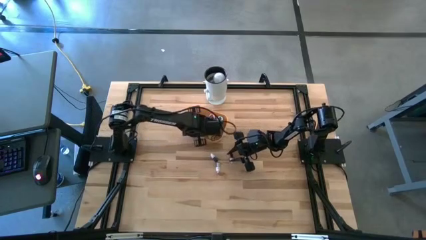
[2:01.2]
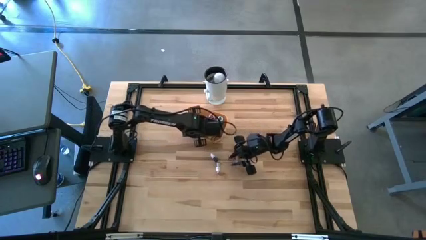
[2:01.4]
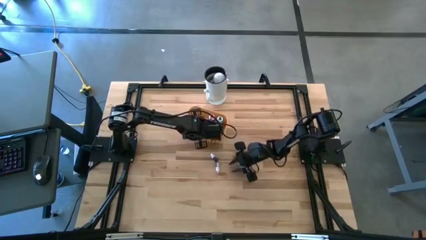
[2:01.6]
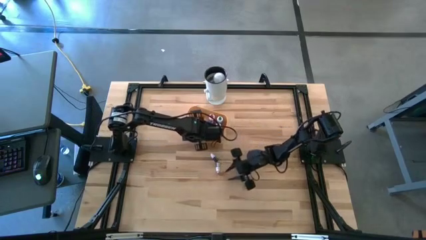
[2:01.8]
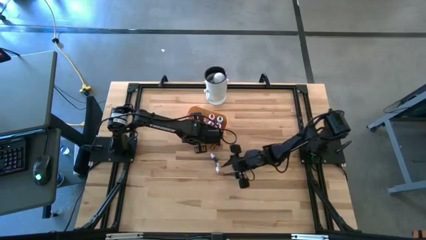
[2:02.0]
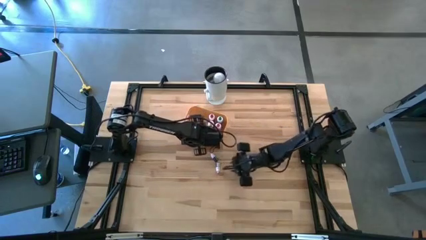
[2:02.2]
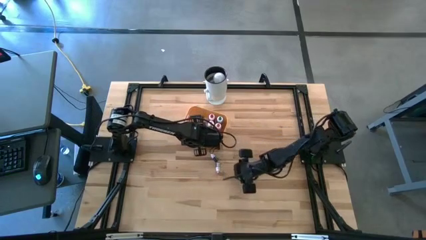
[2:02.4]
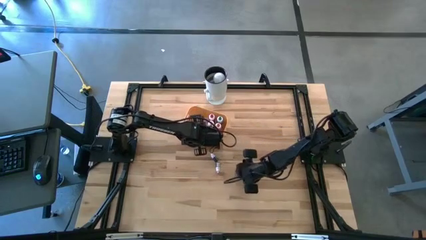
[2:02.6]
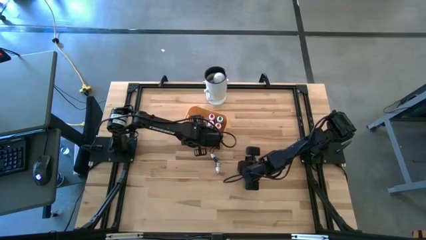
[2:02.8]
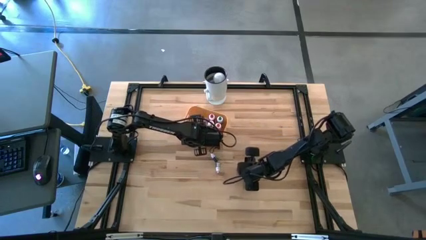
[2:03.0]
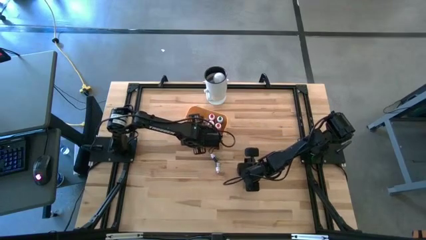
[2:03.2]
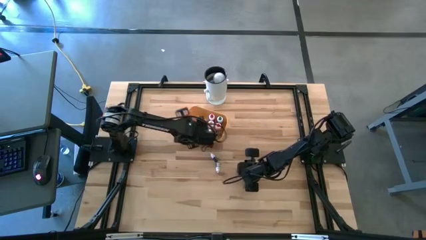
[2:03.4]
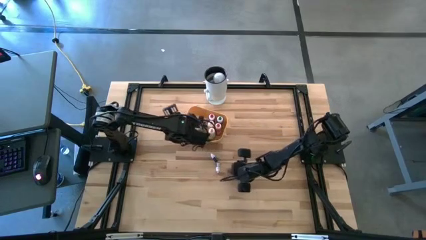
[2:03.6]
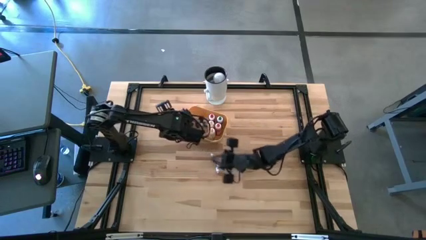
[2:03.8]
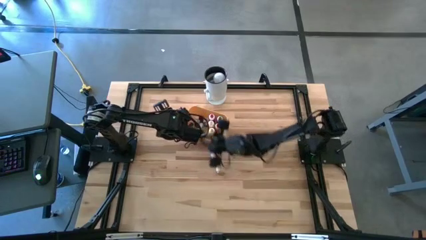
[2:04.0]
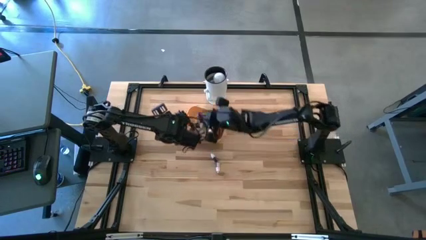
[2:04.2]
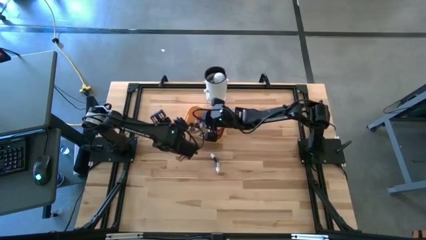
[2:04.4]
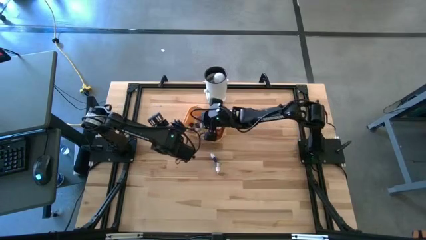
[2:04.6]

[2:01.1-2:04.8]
Task: Pick & Place food coloring
Put the orange food coloring bottle into the yellow bin

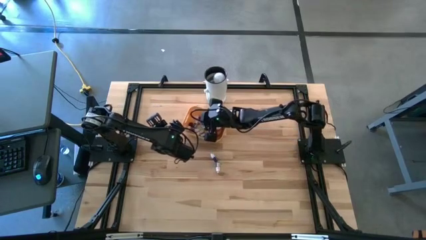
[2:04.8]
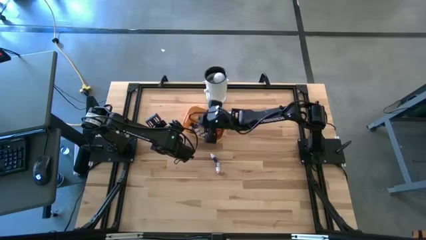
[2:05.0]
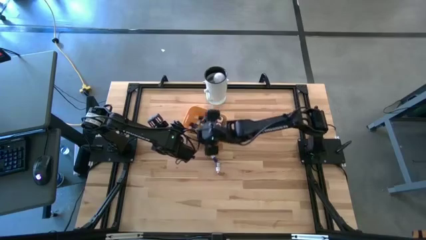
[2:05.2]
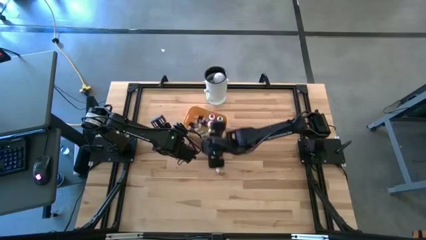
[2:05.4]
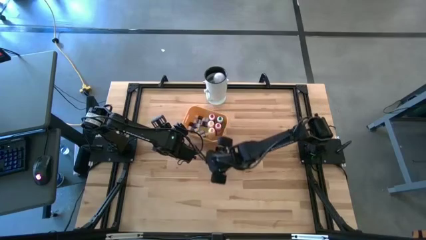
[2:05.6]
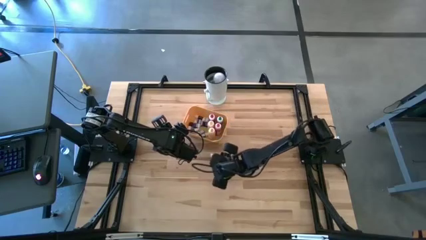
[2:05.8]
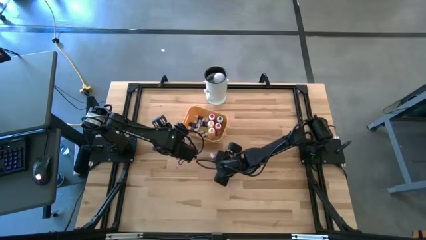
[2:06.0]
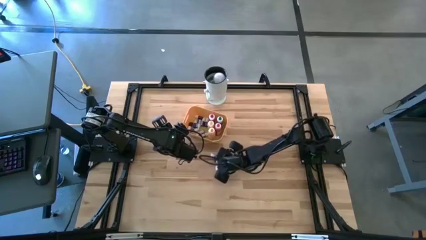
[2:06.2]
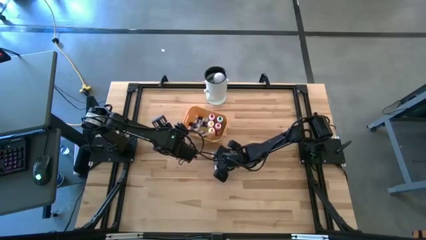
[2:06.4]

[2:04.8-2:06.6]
Put the small green food coloring bottle into the yellow bin

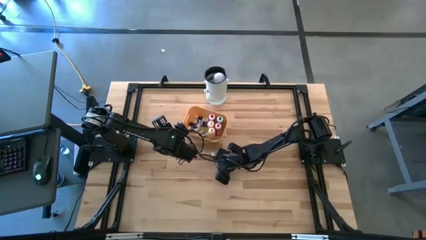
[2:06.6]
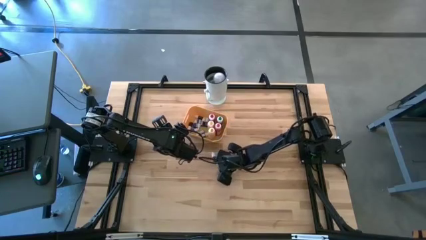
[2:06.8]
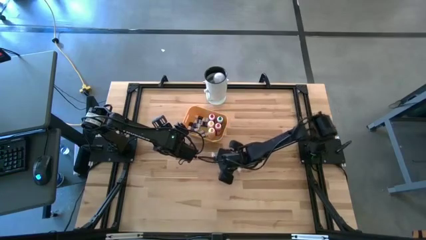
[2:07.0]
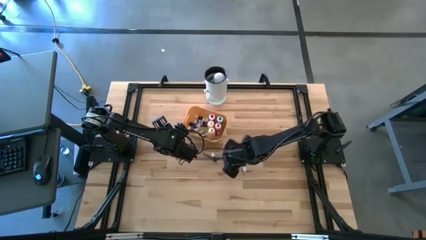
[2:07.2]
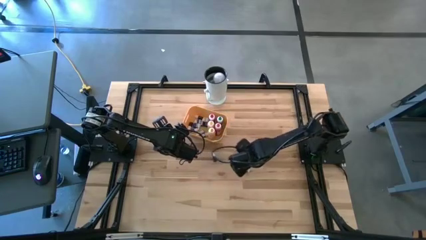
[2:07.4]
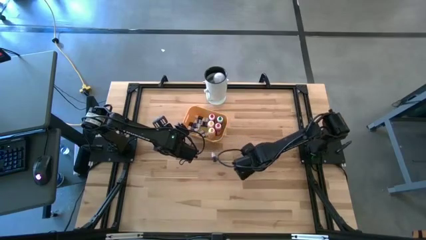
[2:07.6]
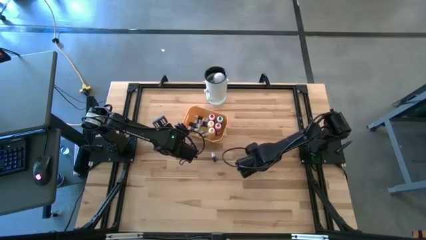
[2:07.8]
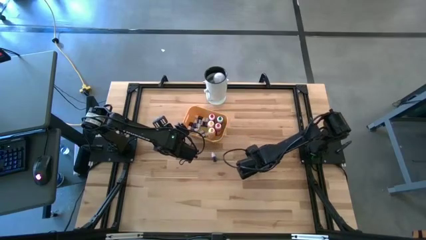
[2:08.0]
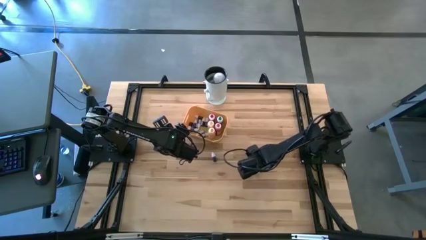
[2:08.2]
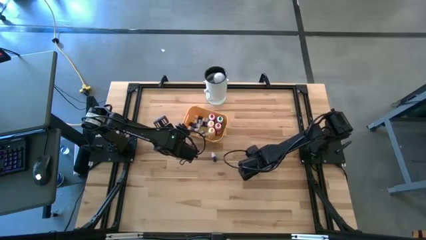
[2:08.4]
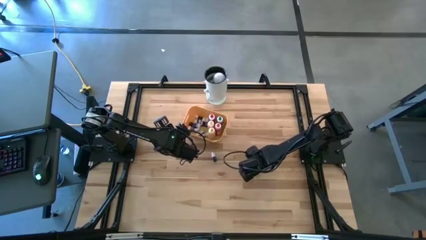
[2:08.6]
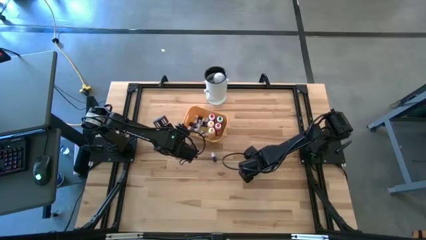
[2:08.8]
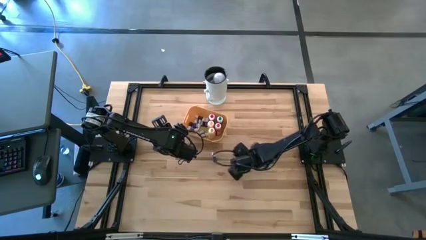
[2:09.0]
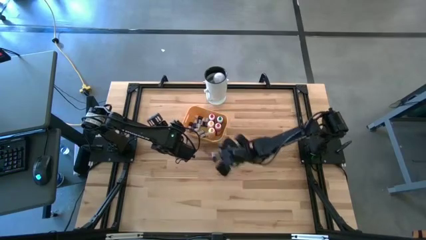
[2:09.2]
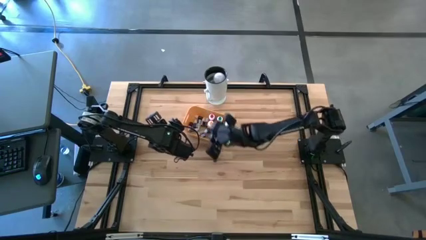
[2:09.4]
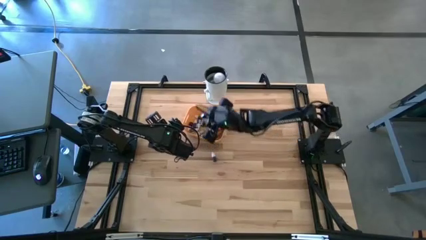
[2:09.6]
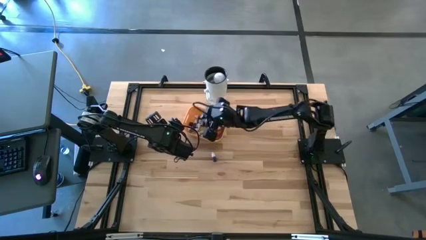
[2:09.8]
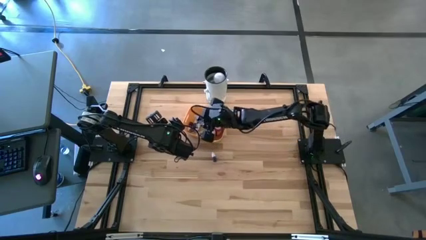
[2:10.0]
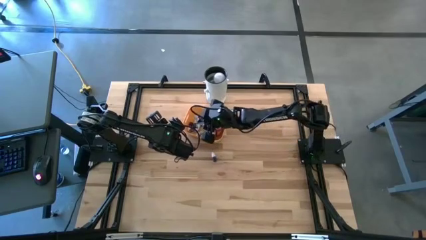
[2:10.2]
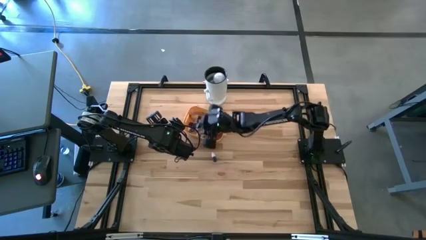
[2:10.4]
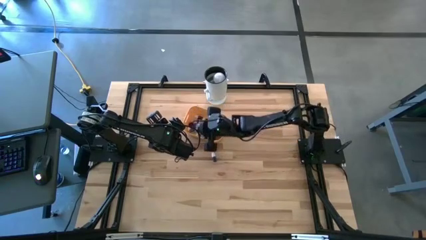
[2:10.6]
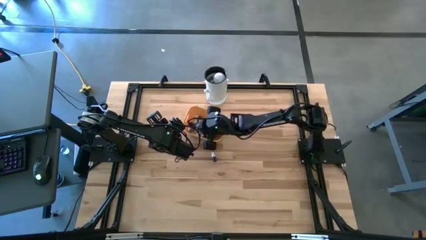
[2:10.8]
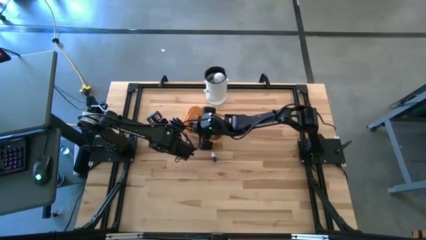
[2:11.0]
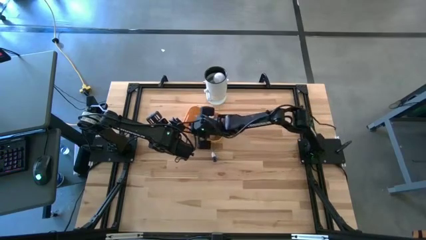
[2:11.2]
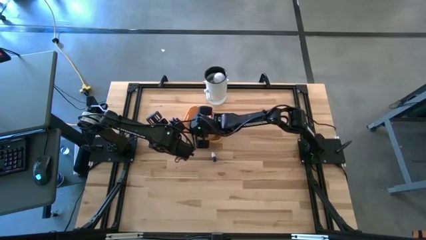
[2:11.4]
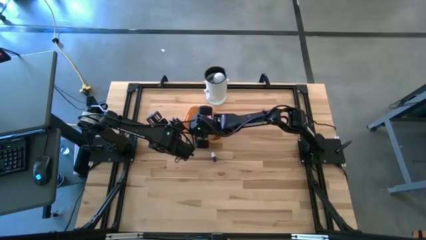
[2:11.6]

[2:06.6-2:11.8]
Put the small green food coloring bottle into the yellow bin

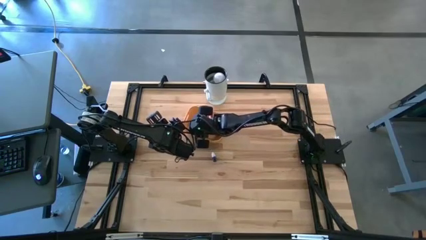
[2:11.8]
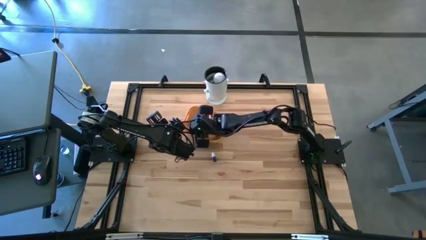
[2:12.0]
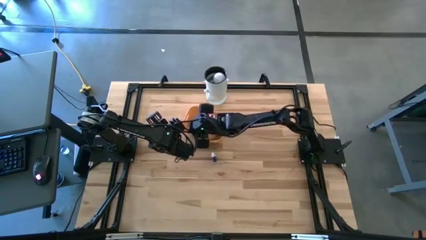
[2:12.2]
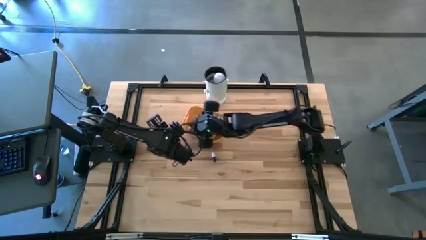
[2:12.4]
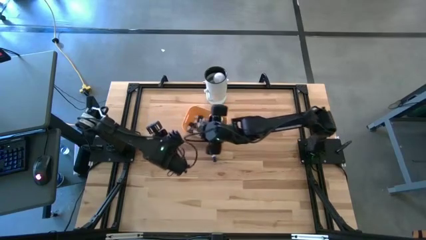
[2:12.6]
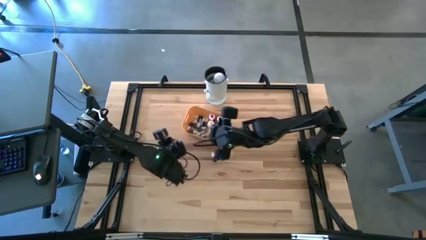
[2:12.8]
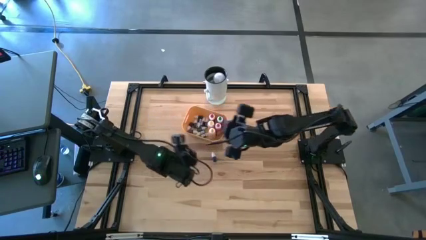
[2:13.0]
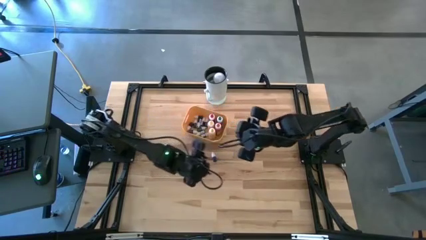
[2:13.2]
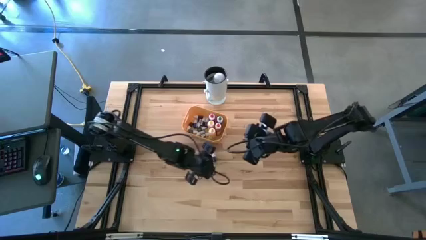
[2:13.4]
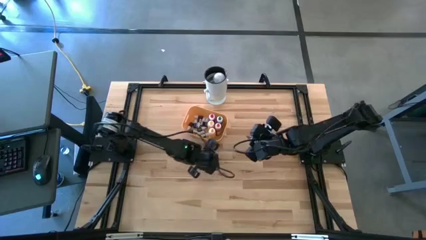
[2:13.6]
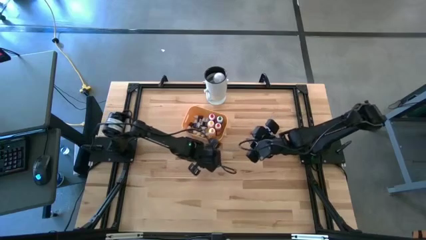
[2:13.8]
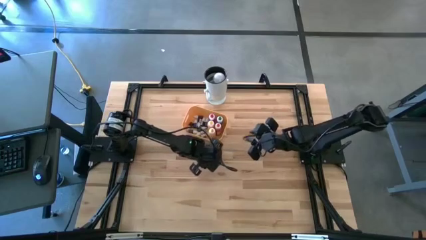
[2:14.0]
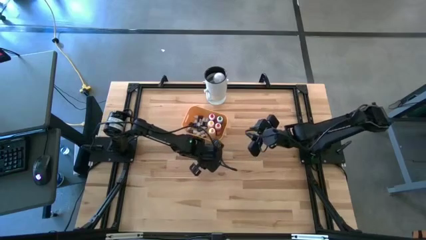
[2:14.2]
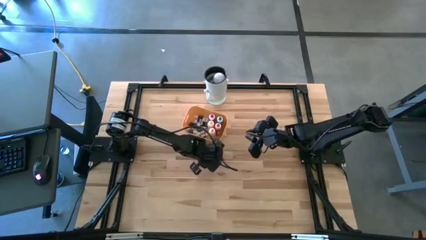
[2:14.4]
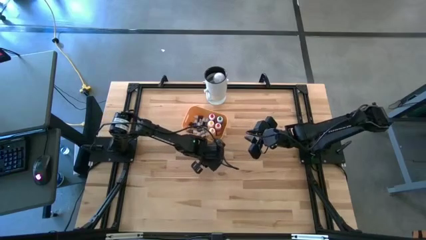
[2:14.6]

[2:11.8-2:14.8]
Put the dark blue food coloring bottle into the yellow bin
